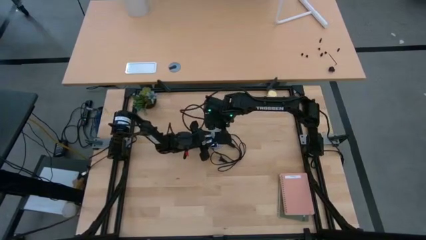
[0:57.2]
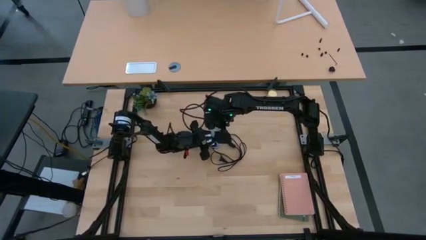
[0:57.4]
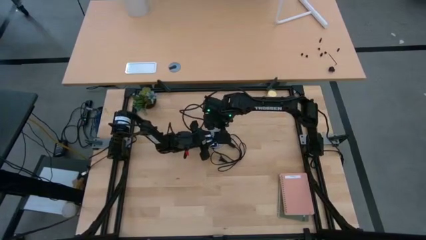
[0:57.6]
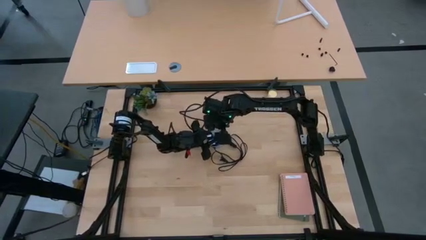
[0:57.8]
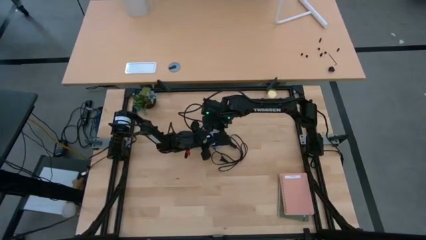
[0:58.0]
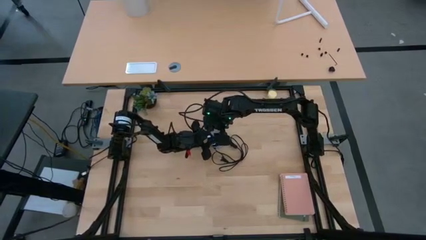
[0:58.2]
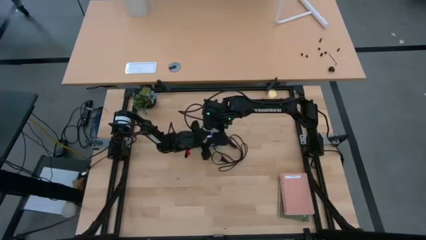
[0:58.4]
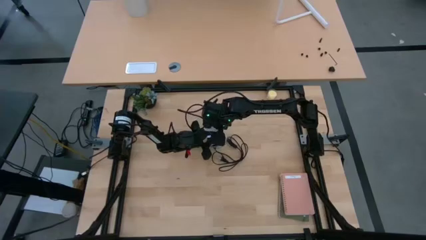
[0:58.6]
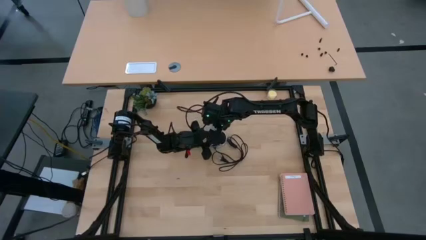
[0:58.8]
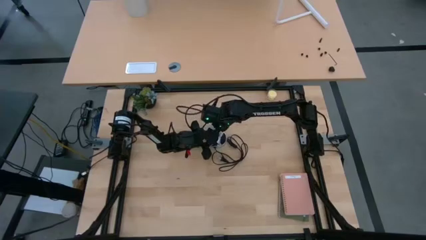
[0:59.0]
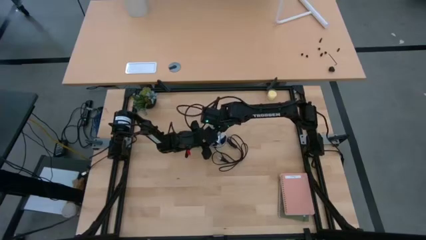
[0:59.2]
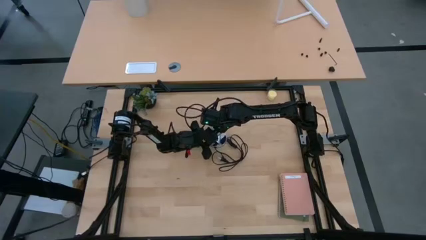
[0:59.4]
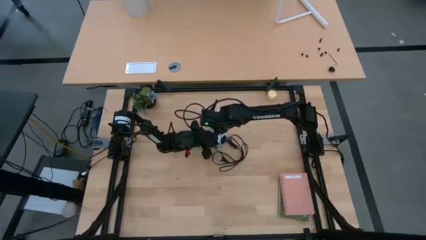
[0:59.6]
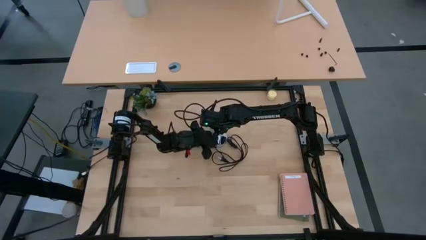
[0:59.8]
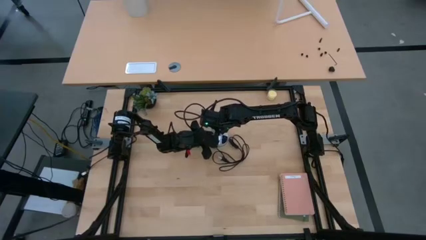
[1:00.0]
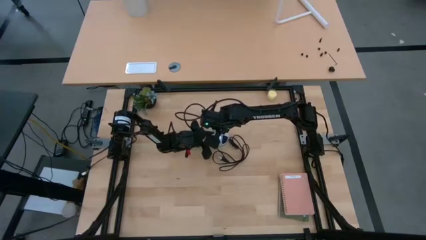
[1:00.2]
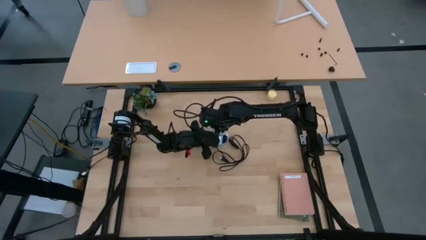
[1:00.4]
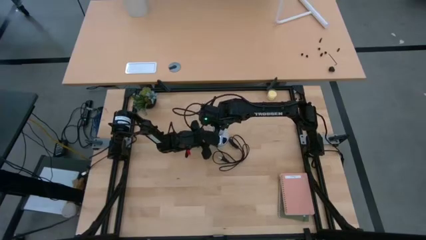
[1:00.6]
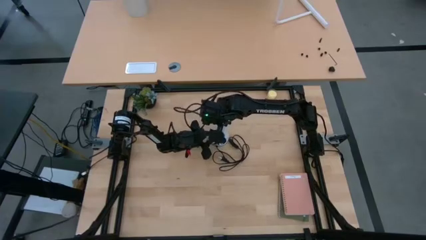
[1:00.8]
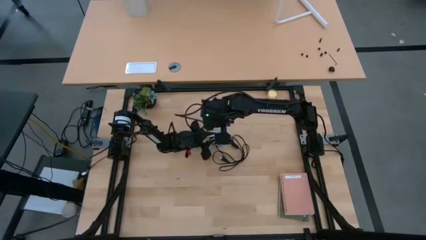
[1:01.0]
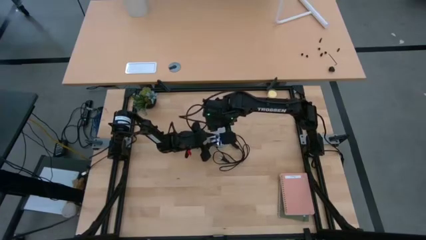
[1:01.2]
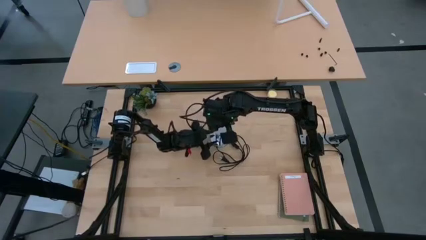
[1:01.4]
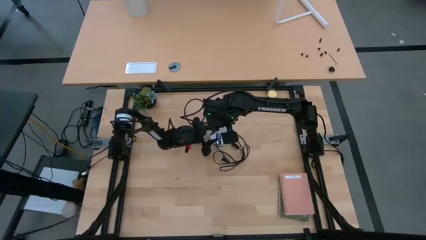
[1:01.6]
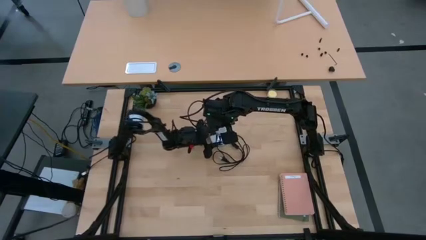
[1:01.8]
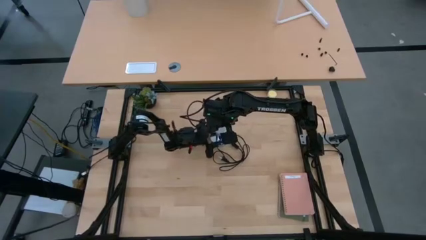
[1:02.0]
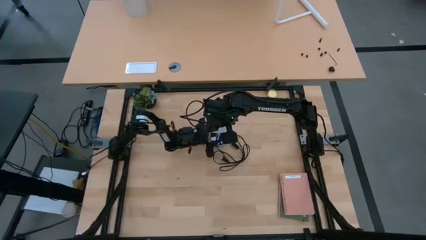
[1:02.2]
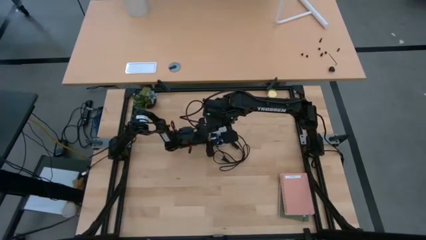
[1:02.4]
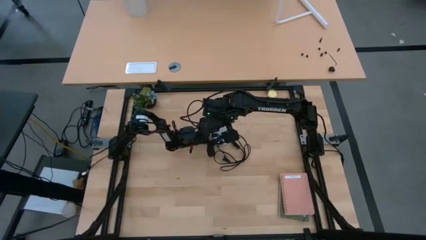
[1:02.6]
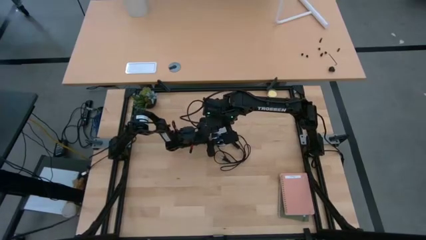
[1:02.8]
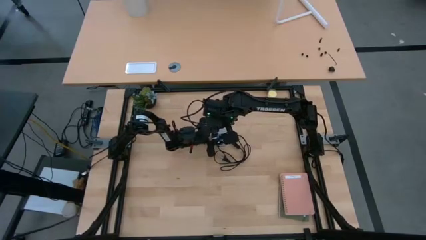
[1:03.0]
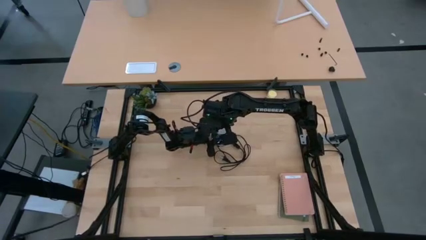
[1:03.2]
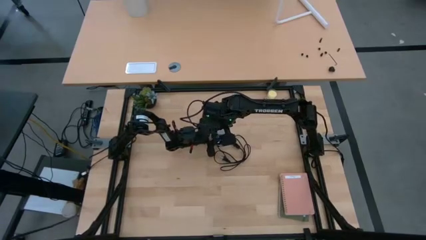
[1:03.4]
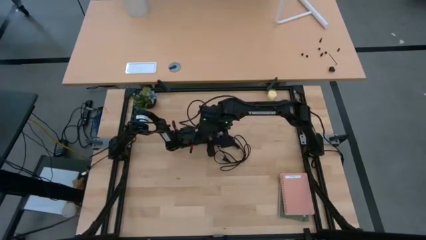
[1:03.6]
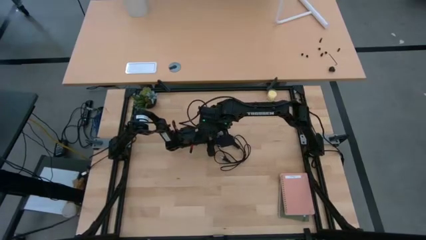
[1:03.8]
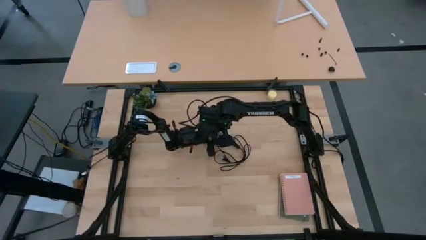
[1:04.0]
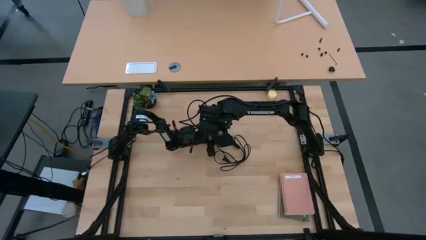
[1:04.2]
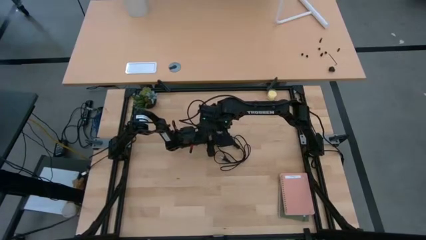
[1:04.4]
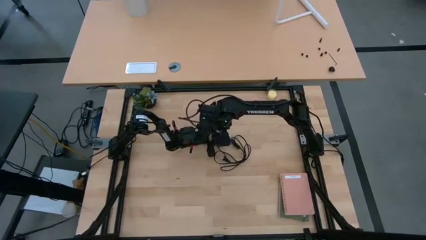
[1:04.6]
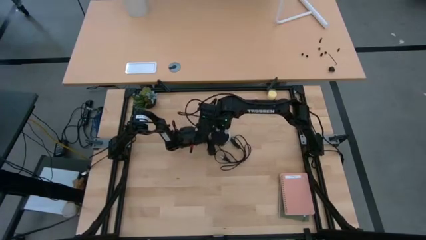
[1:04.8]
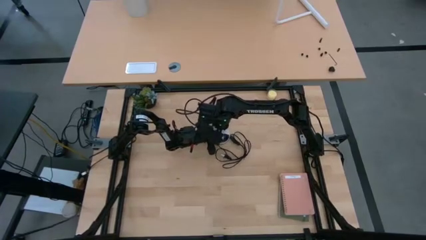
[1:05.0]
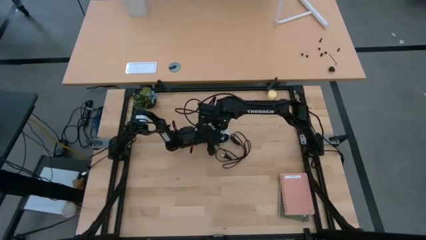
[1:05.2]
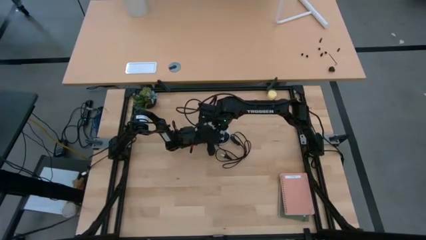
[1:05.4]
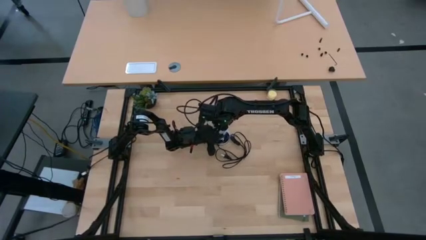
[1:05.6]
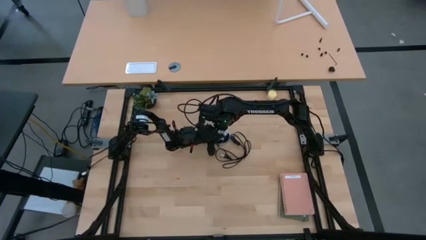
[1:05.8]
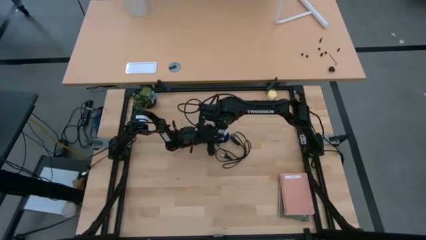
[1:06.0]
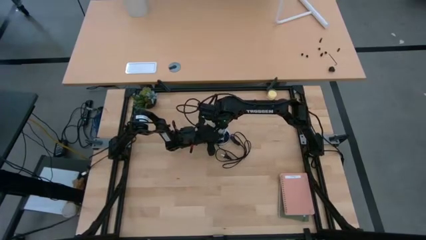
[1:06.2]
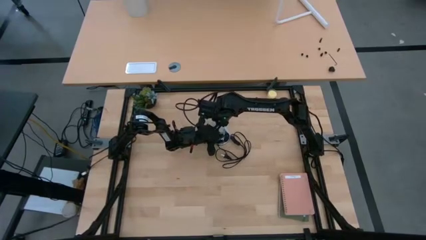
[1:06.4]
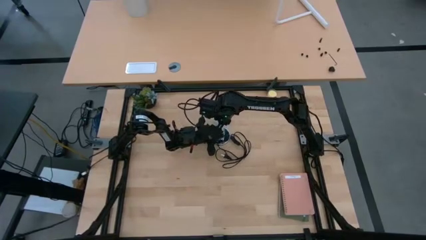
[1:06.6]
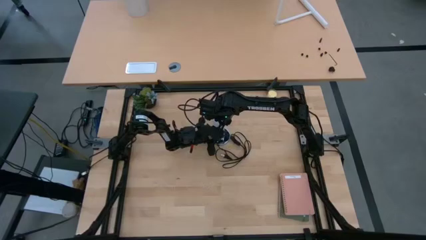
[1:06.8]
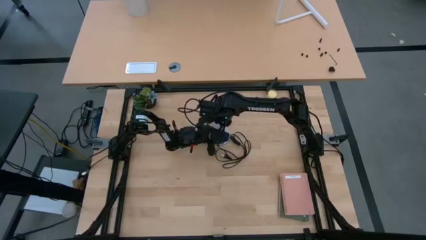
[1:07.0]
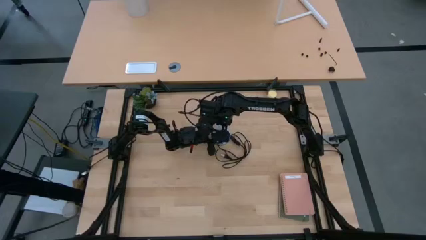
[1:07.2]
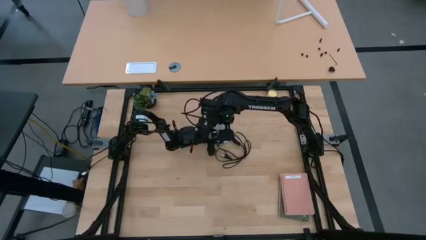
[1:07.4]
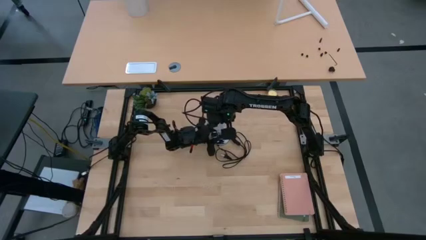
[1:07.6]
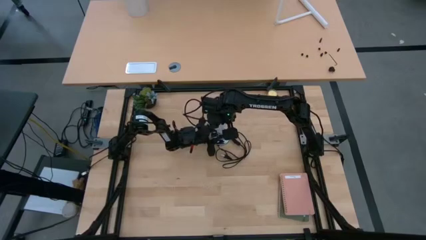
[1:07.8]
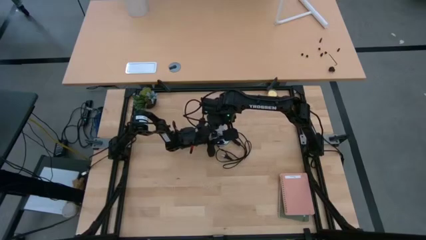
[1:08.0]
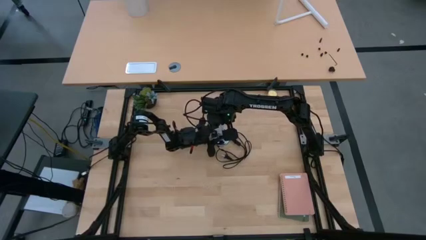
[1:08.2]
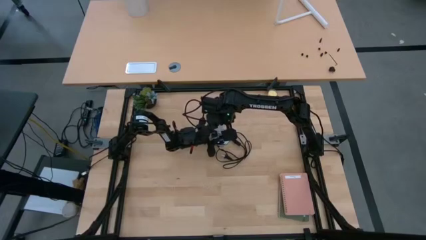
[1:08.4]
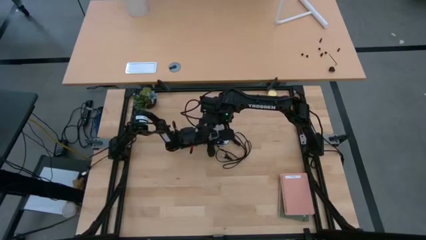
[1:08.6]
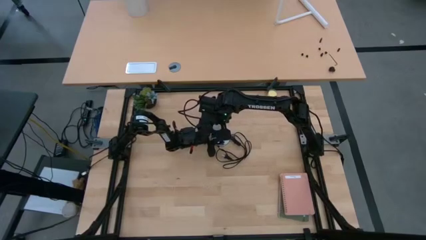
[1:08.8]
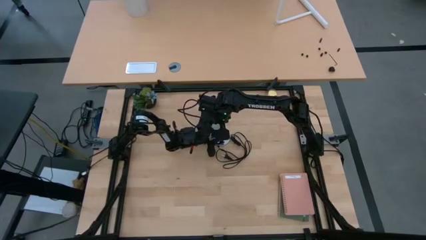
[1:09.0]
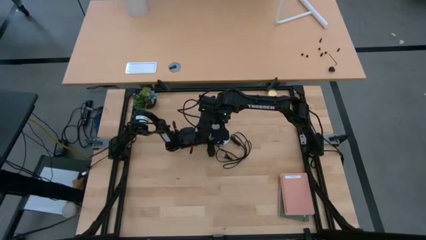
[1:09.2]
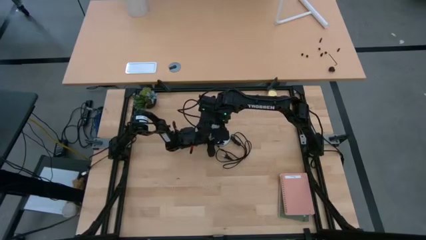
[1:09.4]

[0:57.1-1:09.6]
Task: Screw lightbulb
Insert the lightbulb into the lamp
